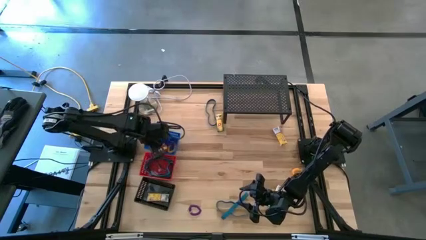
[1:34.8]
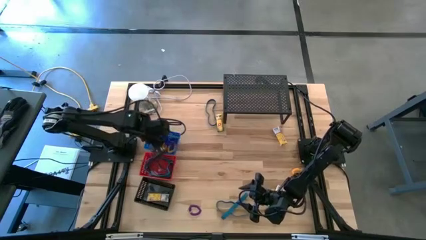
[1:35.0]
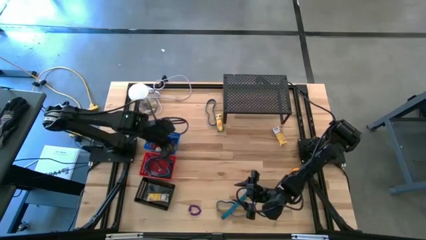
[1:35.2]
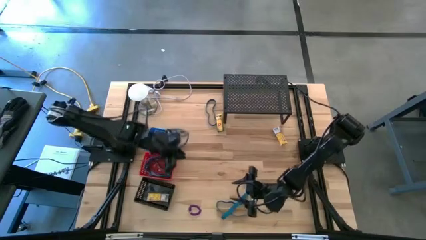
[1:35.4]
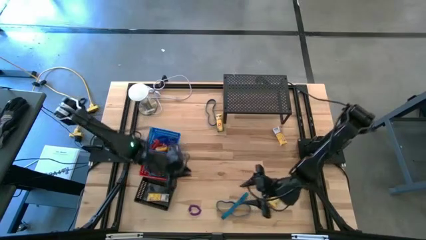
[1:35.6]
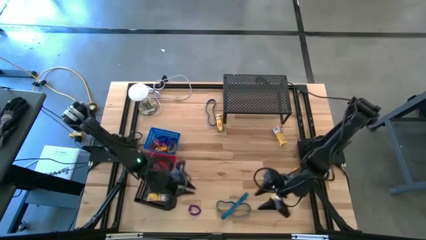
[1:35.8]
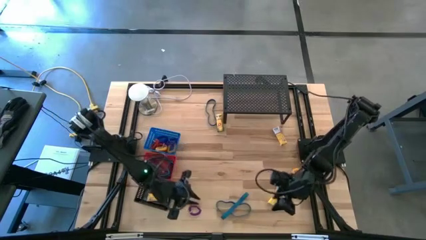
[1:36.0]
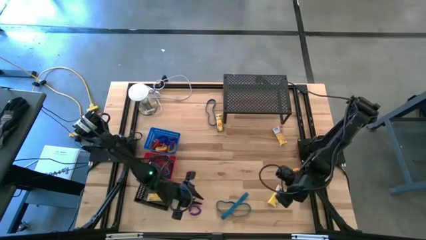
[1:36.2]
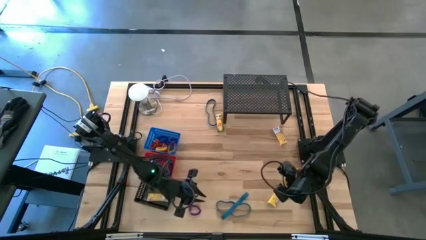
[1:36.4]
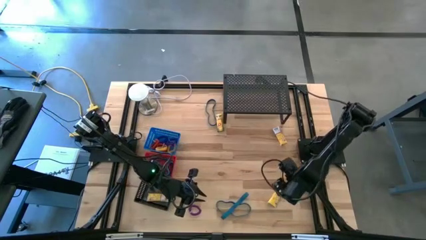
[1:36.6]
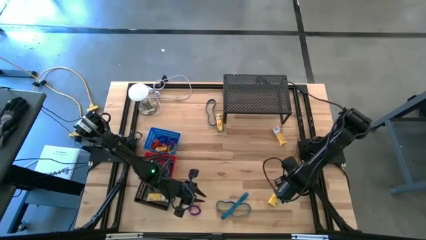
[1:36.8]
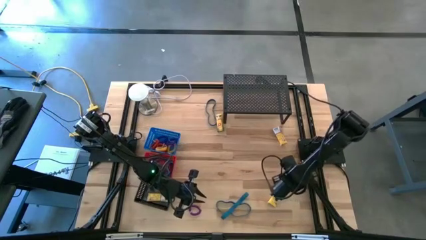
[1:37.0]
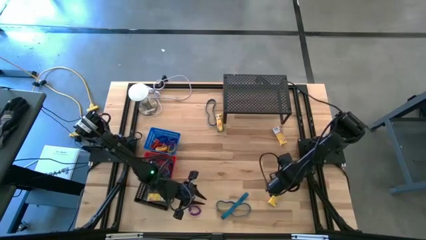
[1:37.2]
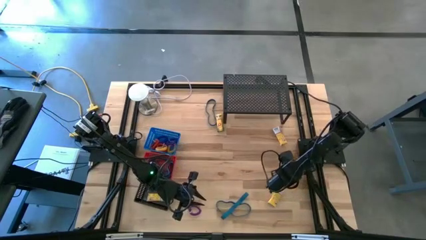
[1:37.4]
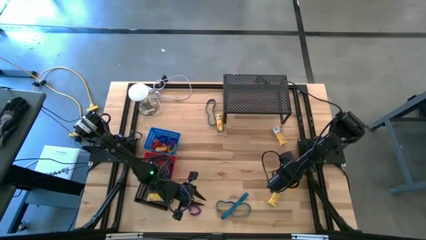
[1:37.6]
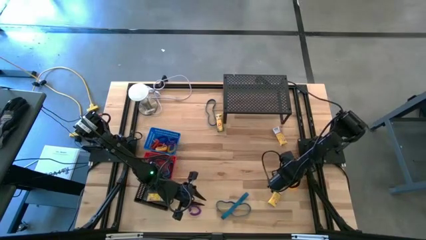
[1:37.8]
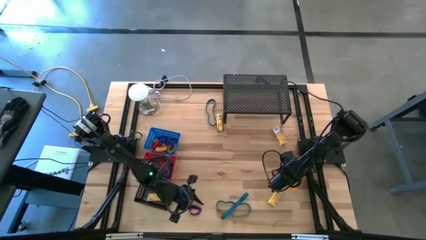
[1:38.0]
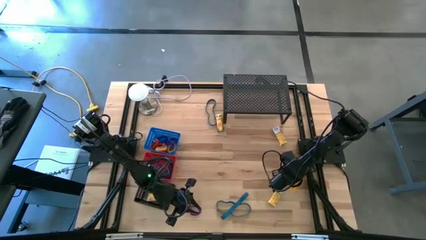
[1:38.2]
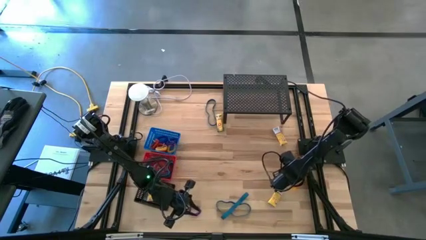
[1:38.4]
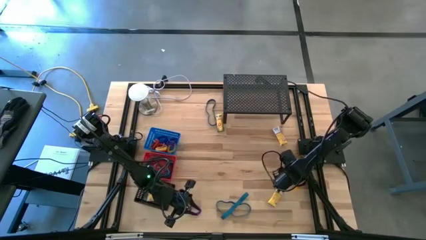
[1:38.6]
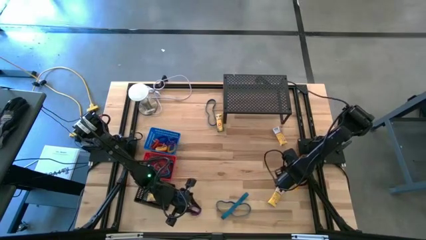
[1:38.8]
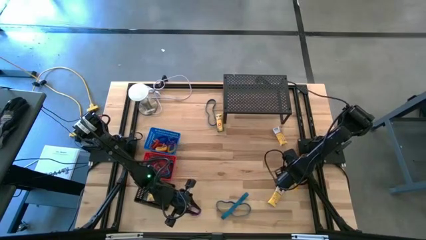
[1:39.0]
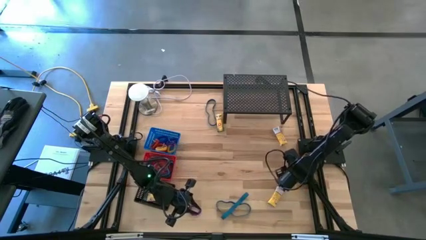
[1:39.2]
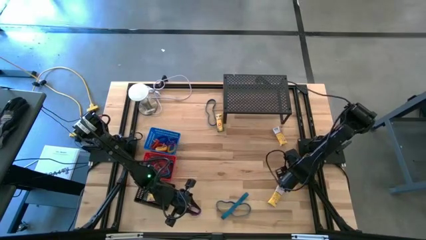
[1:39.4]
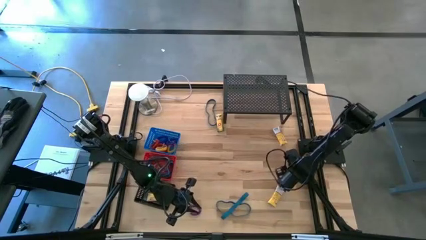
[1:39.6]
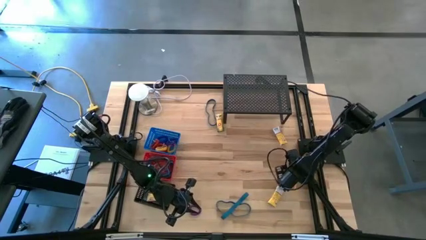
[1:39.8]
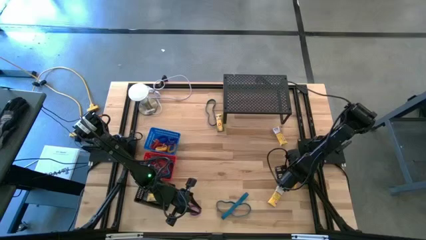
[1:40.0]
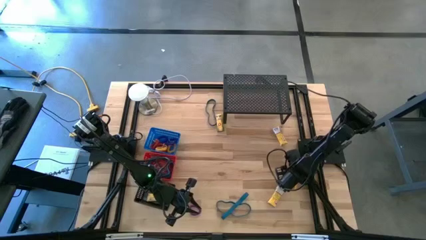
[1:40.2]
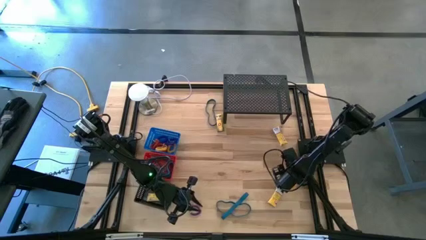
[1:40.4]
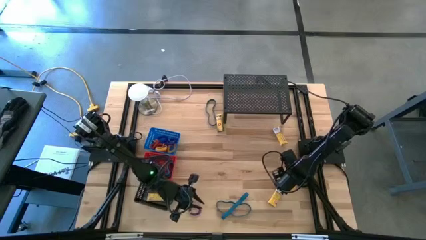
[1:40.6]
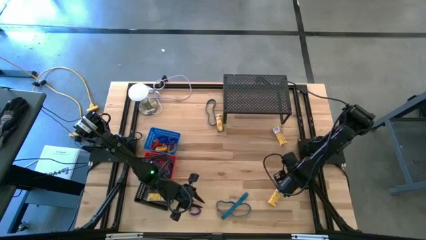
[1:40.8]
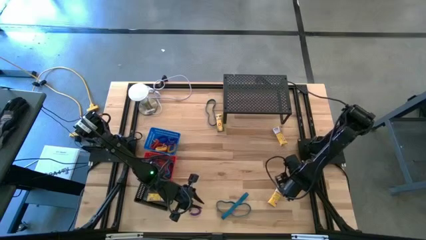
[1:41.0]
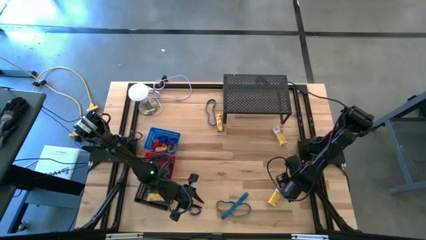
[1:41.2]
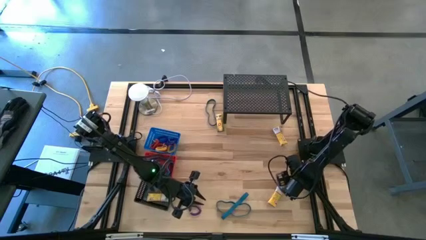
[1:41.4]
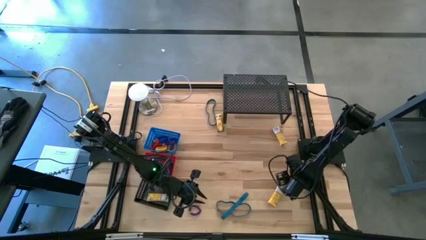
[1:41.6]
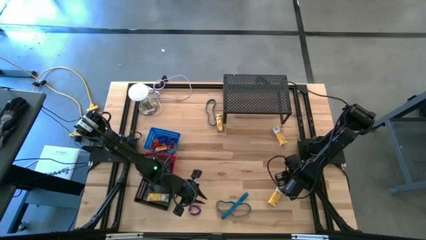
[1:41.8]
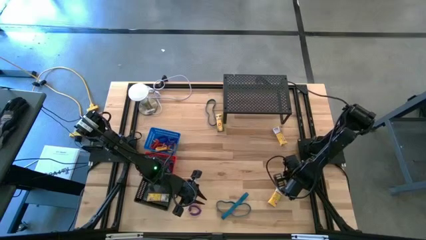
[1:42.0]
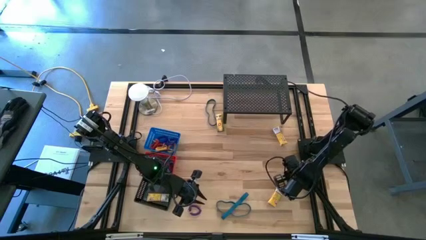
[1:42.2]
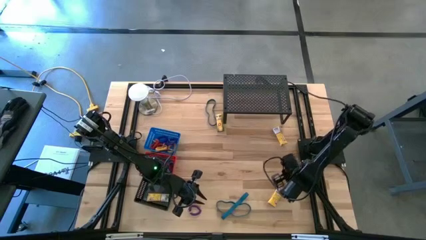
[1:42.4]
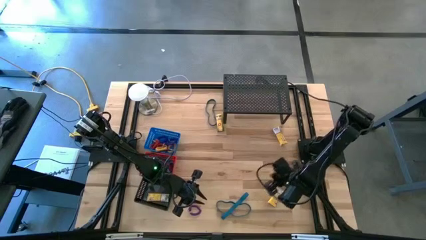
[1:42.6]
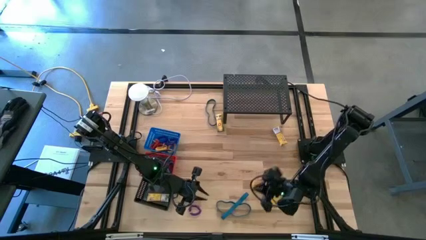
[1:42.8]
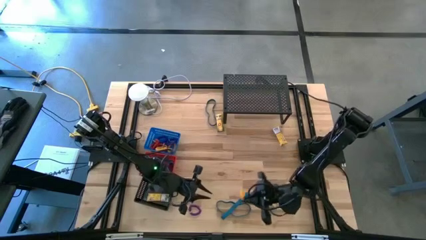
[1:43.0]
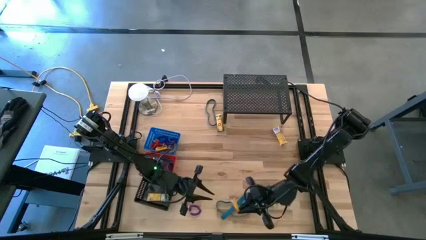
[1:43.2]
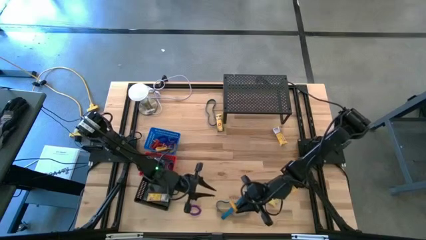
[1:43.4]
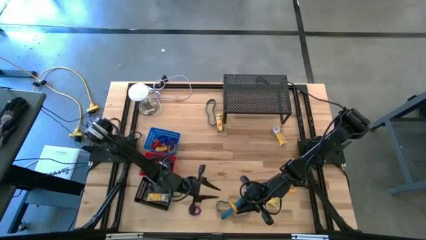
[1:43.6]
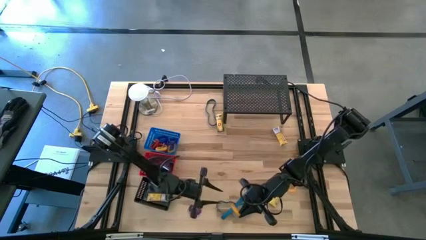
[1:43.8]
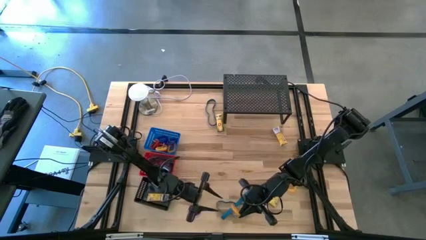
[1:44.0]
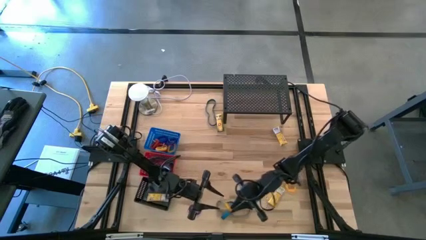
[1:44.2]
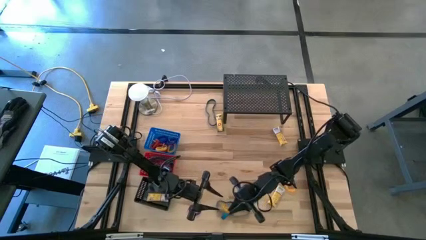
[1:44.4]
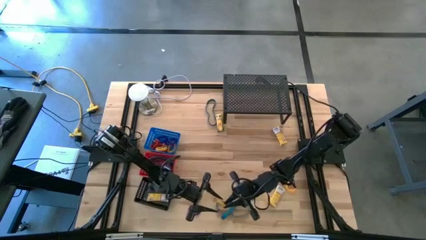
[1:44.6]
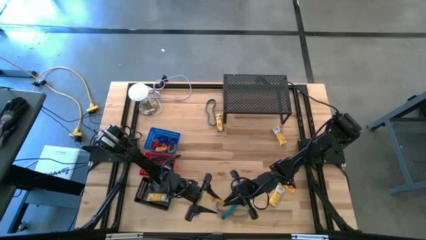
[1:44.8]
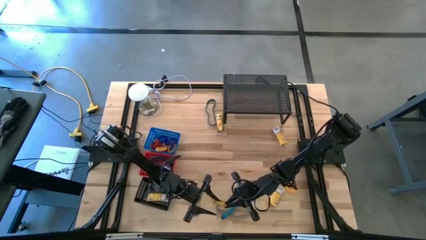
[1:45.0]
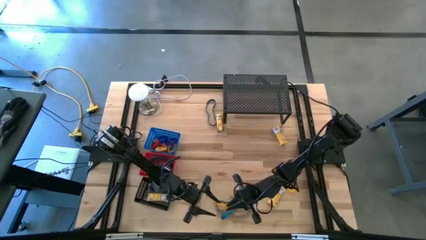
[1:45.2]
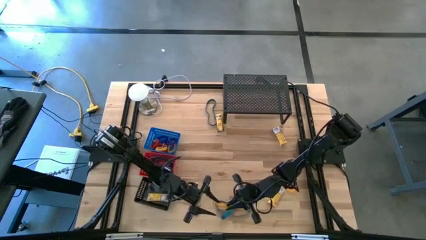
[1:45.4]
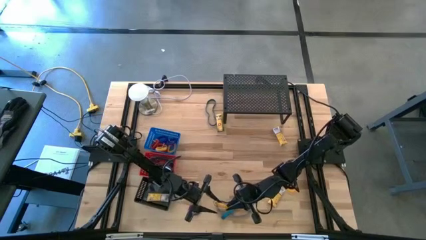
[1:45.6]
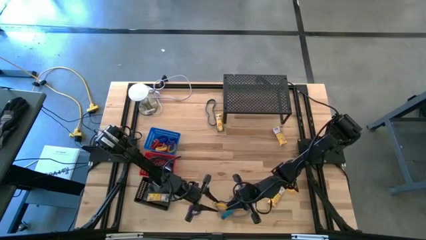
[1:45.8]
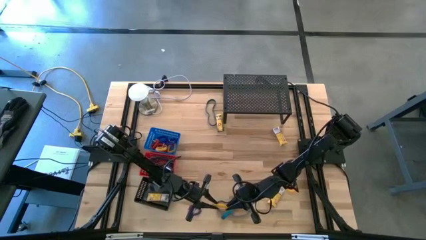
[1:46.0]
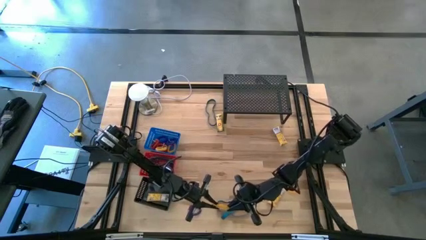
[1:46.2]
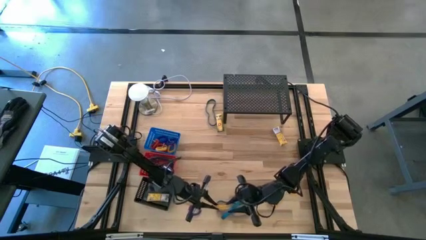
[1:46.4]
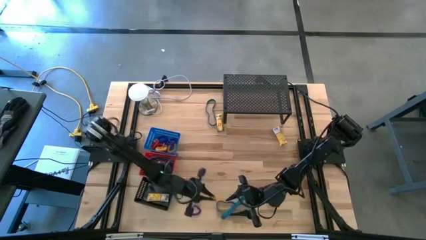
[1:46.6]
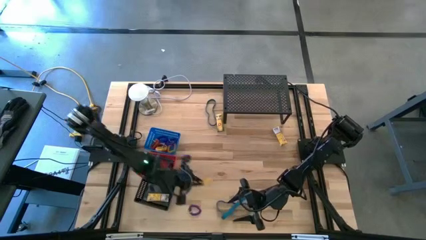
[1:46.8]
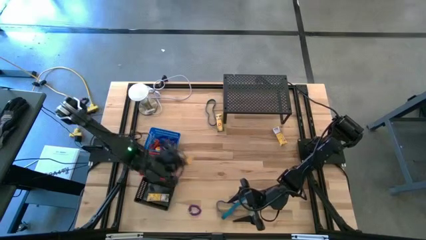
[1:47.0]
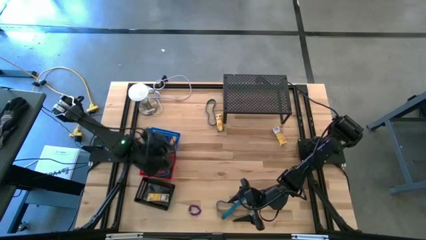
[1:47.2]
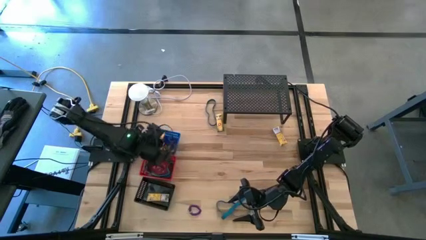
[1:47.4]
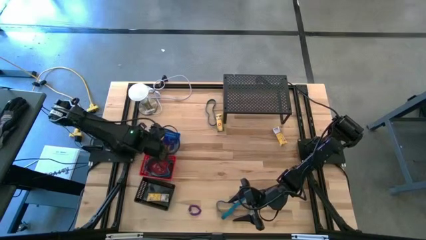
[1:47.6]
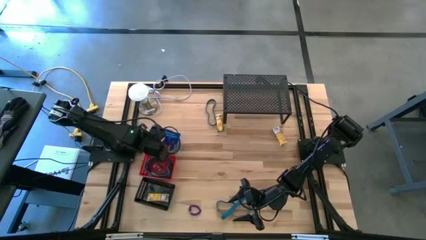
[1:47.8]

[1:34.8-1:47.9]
Task: Pick & Place Office Desk Supplies
Put the yellow spring keychain into the blue bin

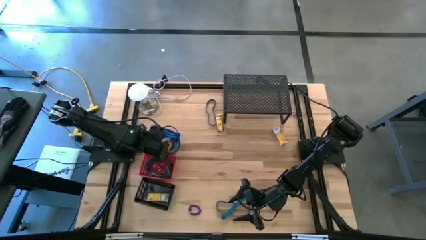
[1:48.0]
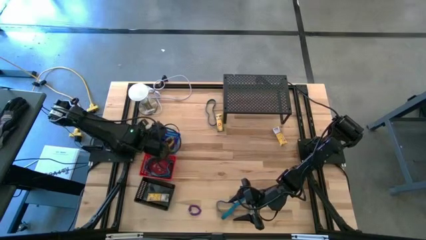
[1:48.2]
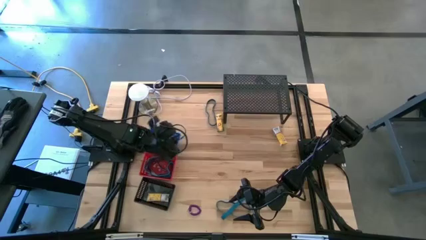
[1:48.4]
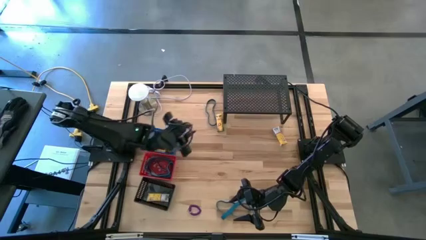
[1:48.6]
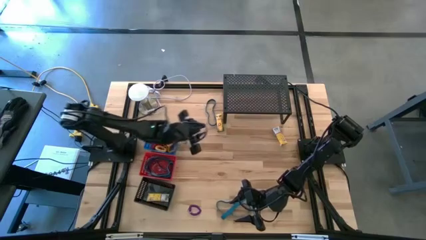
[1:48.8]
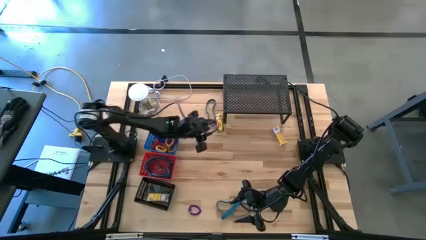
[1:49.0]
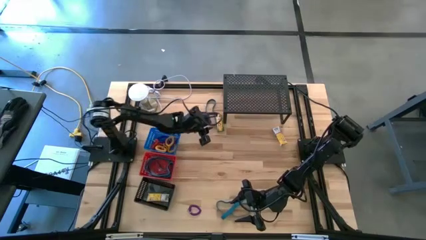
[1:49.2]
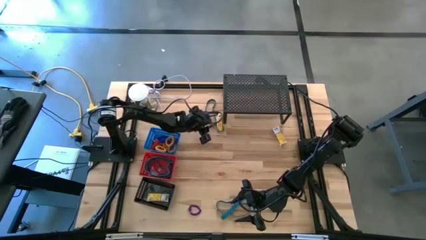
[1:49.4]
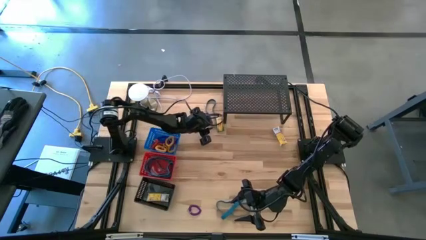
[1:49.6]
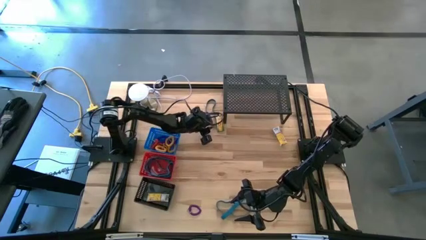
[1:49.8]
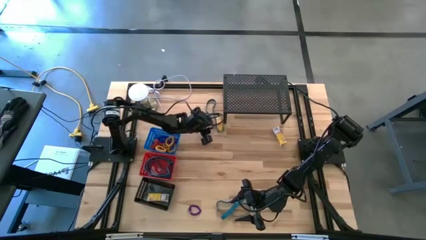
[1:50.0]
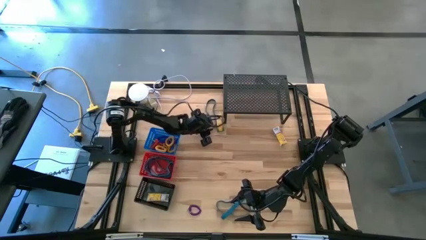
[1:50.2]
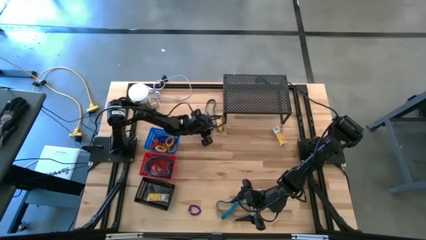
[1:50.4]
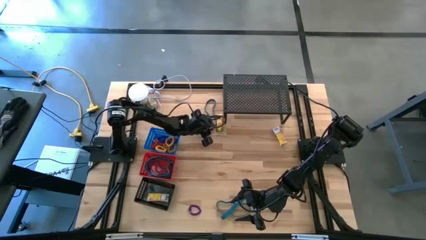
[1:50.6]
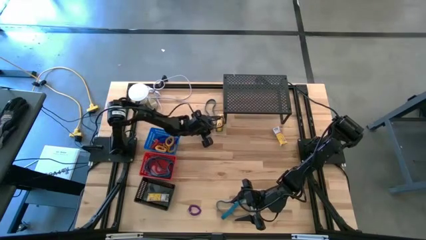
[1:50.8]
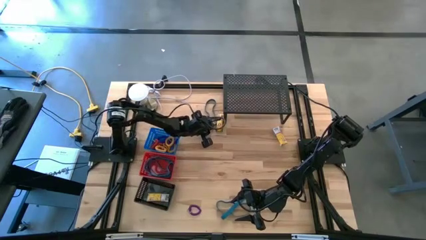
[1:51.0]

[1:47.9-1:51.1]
Put the blue rubber band into the red bin
